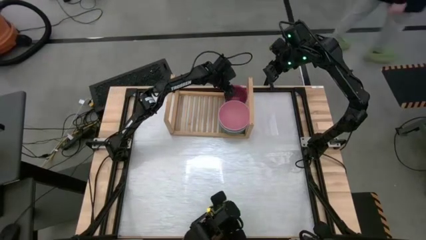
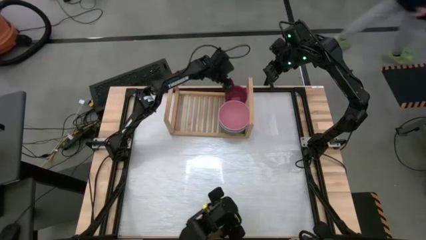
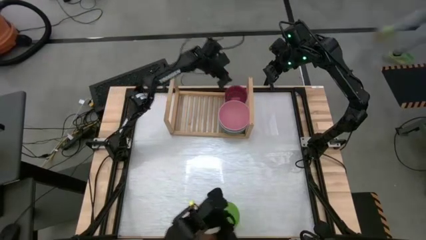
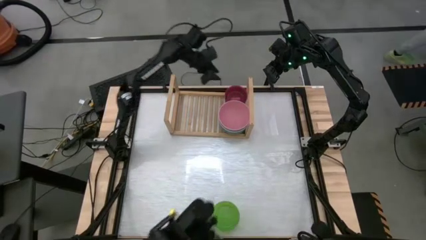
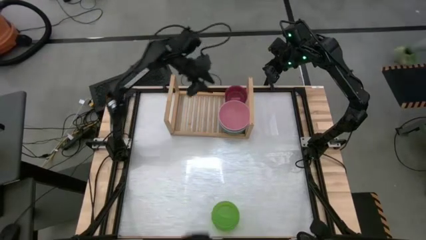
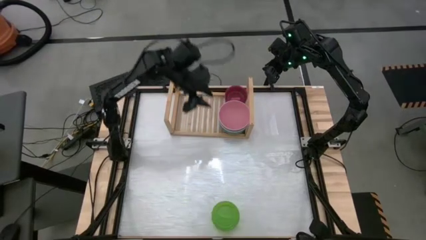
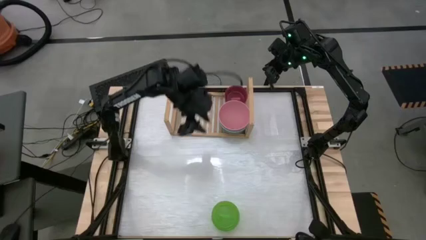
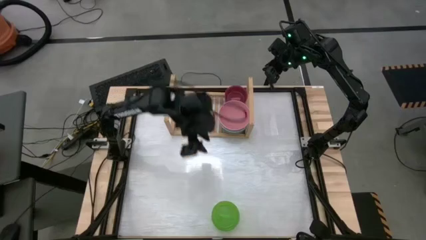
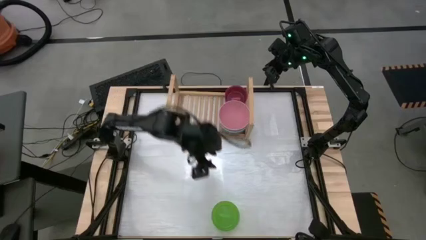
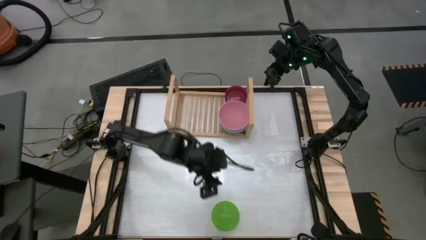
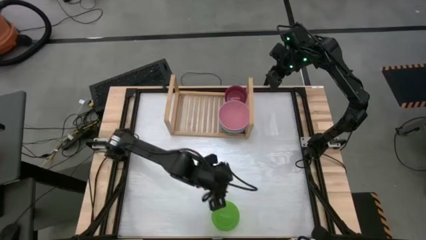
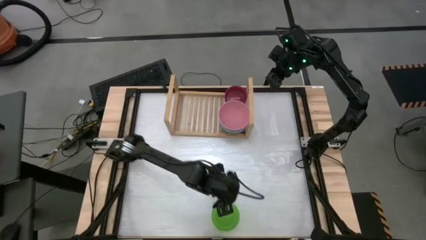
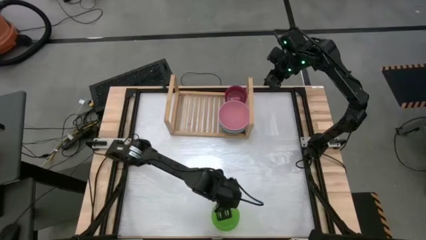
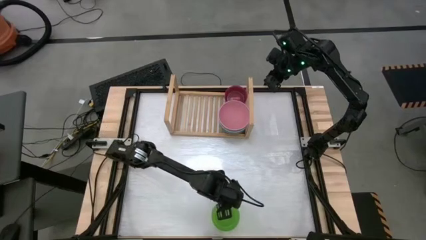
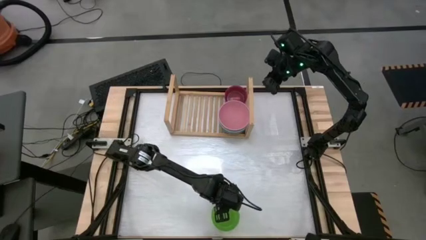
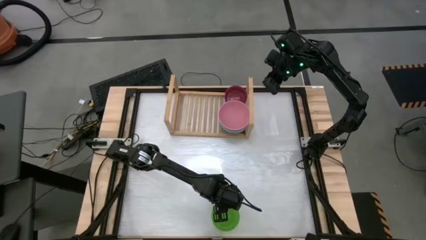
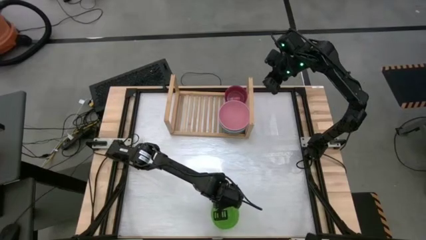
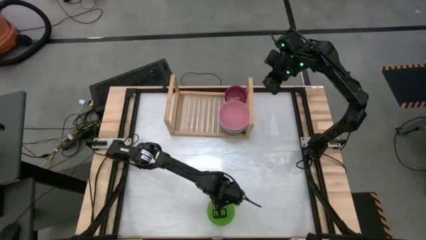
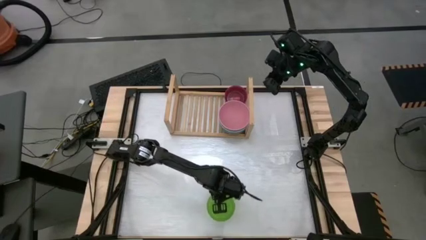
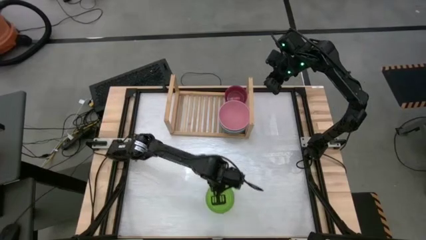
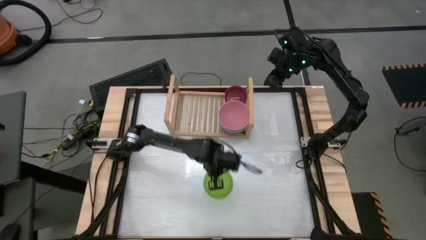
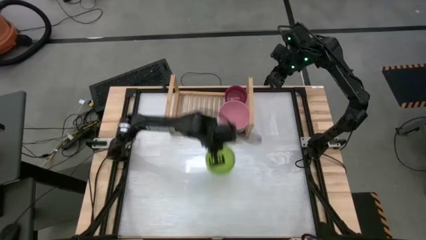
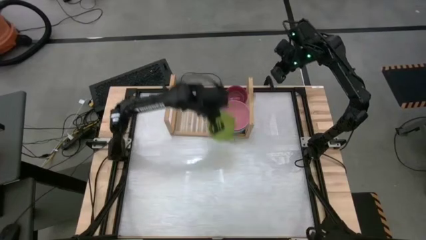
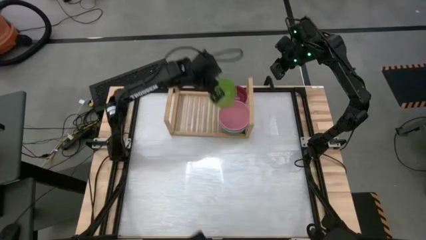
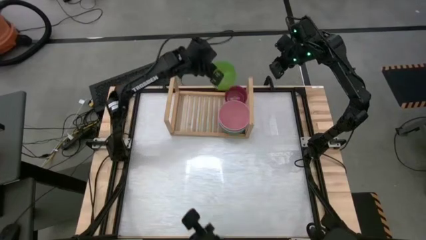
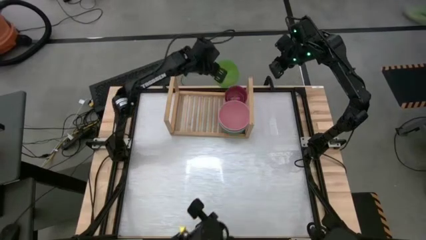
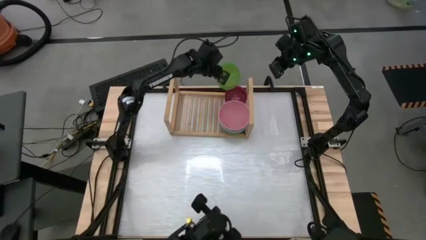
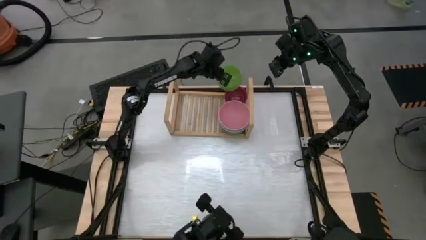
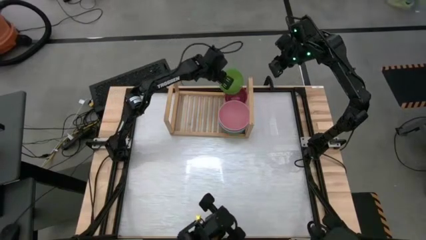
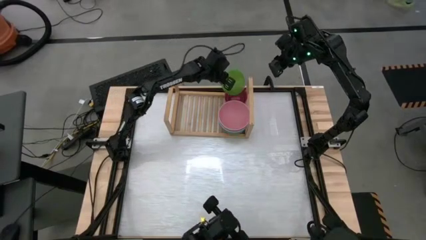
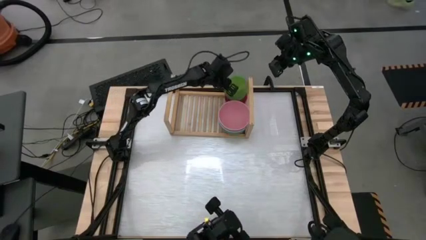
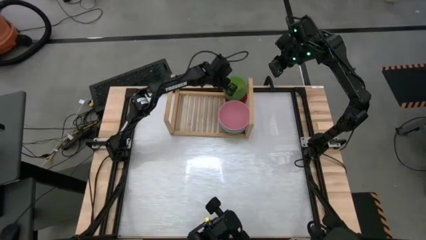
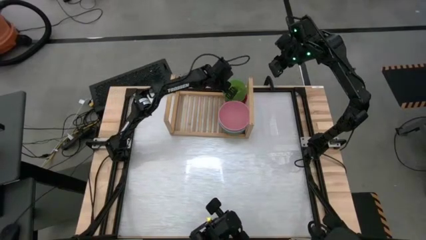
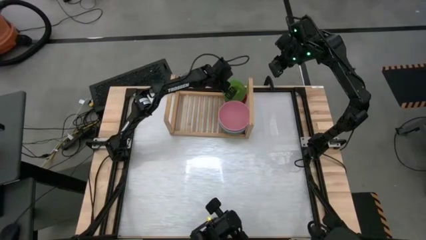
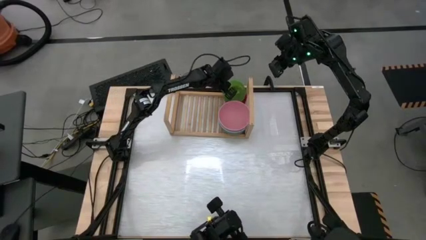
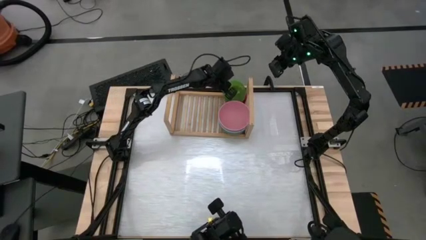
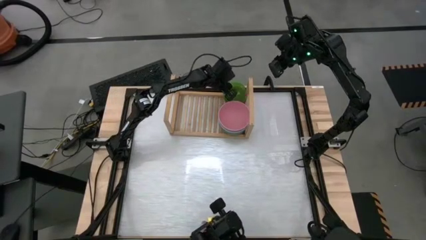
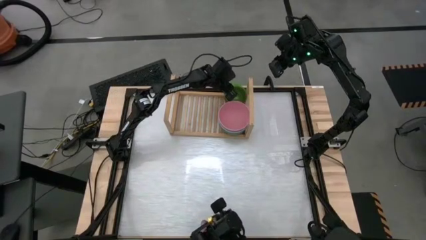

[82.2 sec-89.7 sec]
Task: Place and stack bowls onto a shelf
Stack the light green bowl on top of the light pink bowl on the shelf

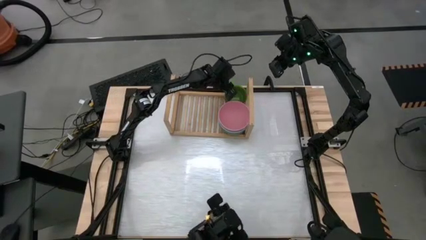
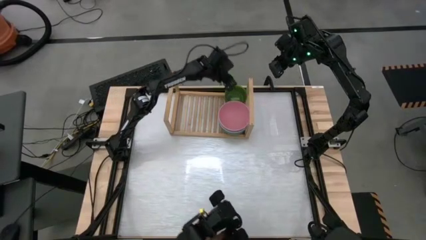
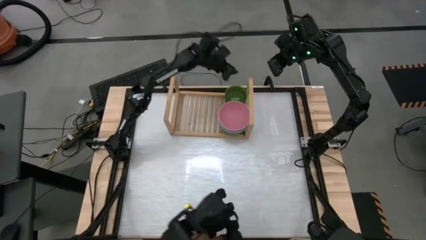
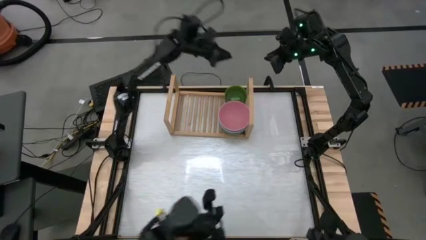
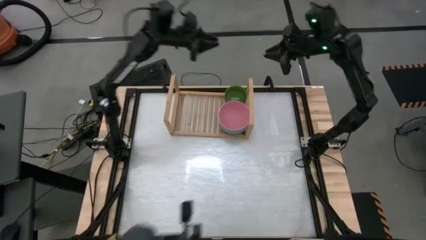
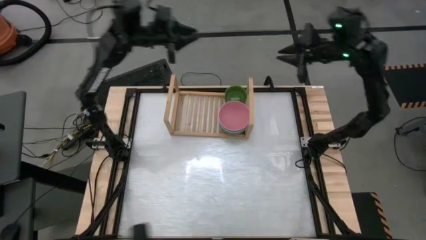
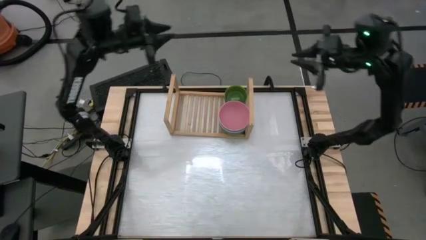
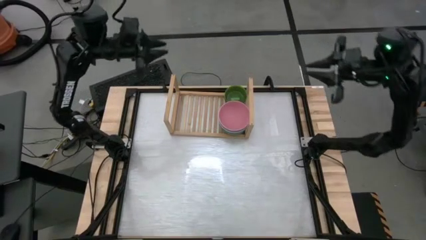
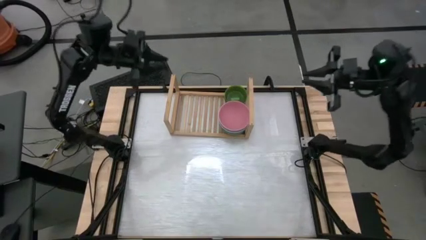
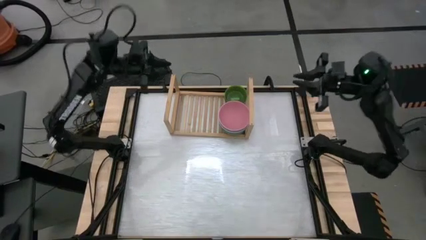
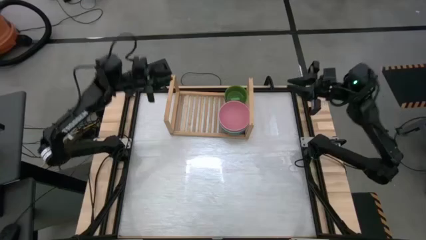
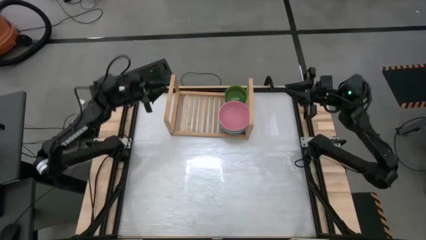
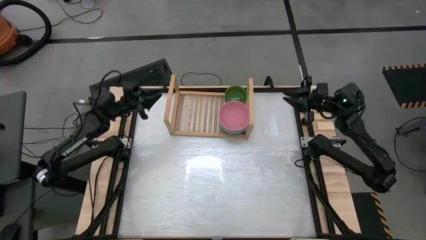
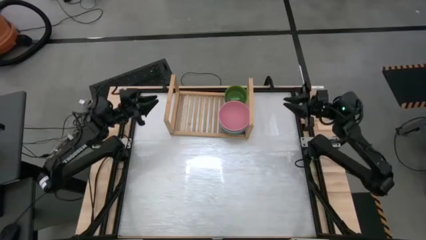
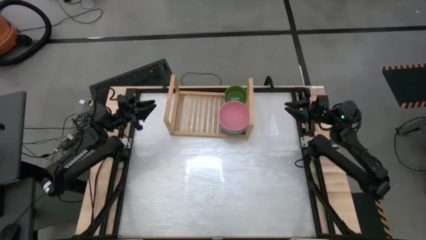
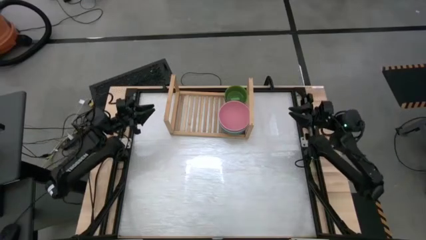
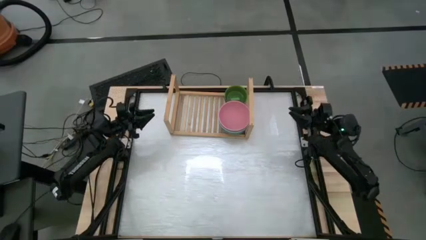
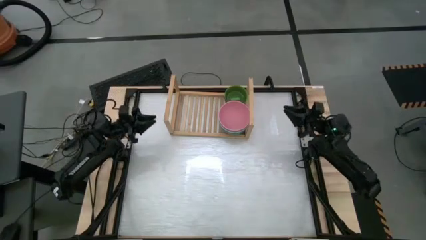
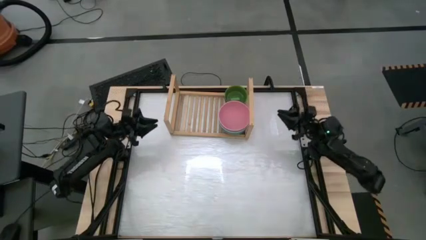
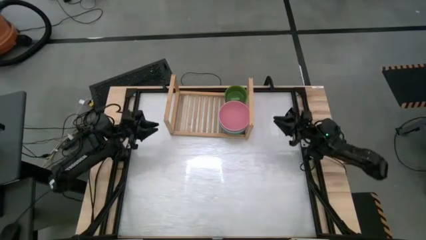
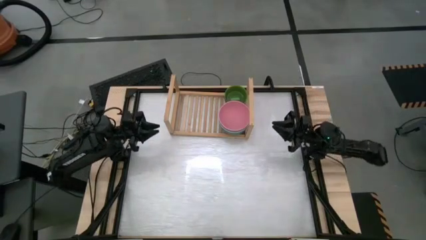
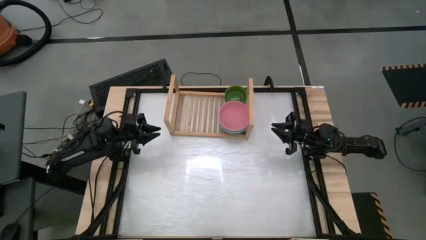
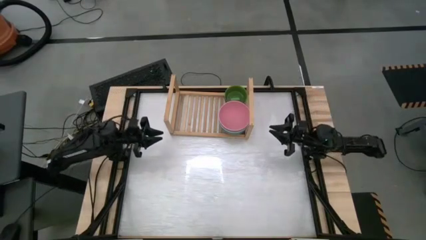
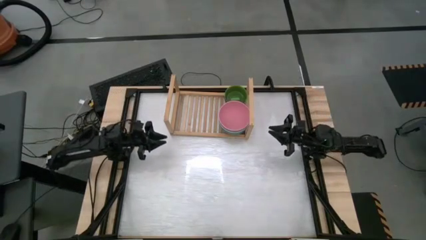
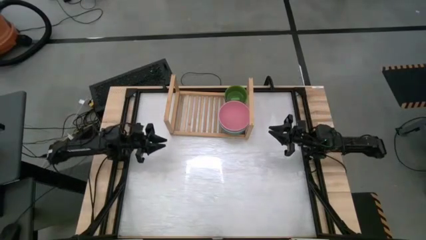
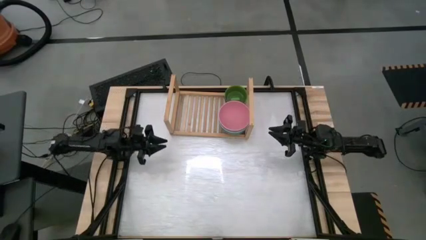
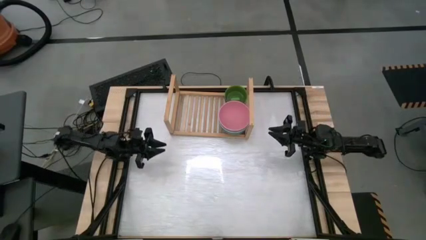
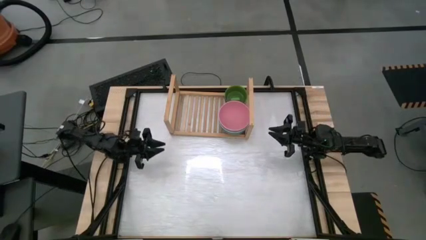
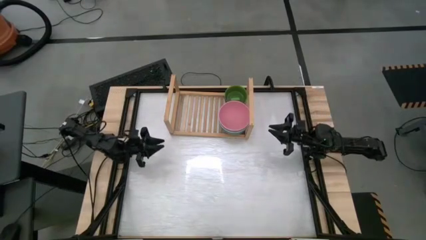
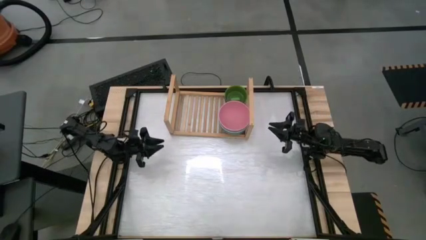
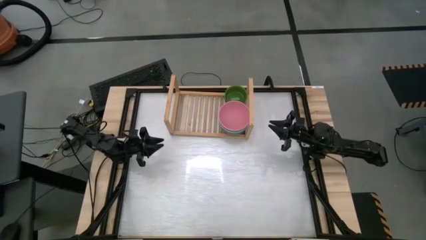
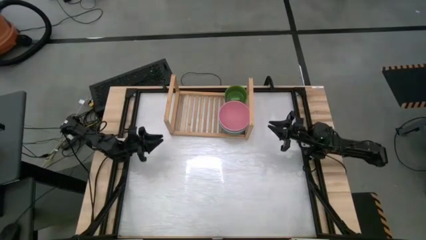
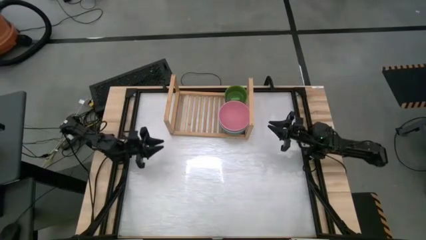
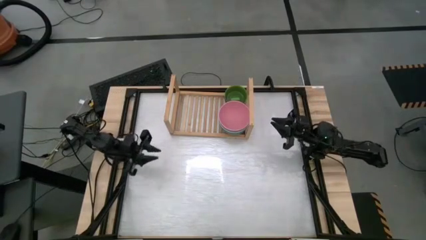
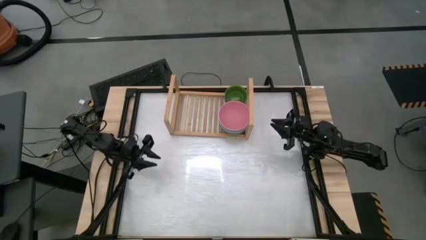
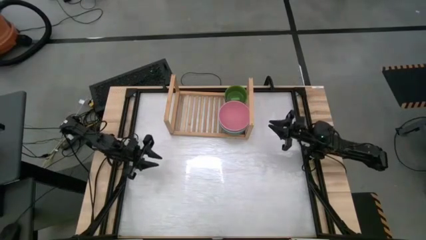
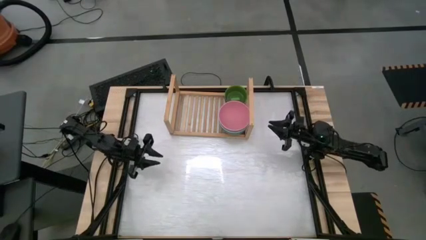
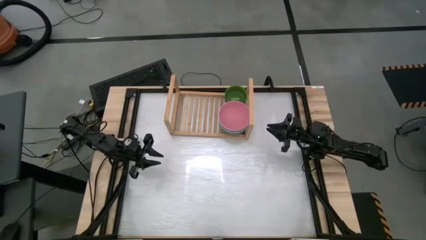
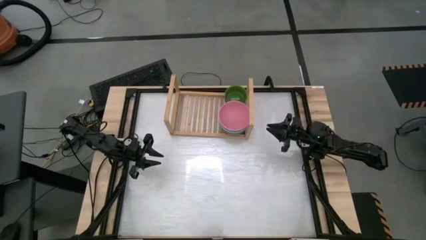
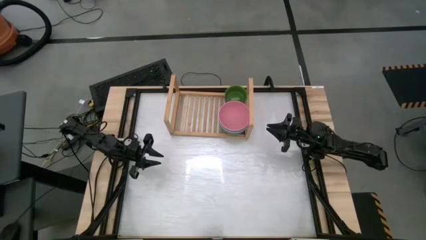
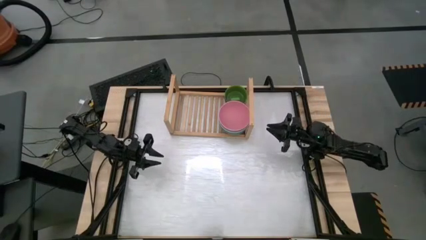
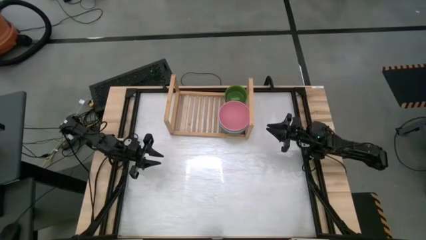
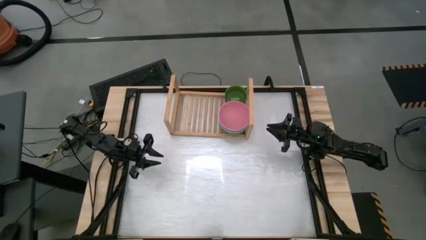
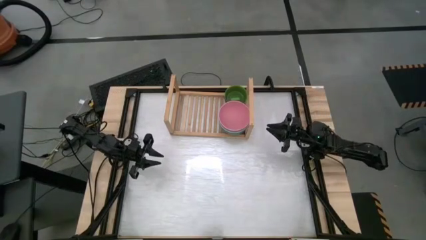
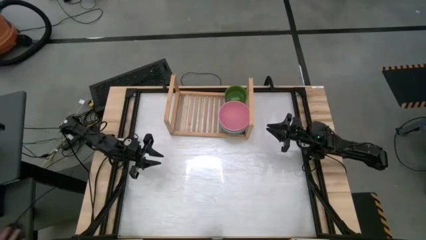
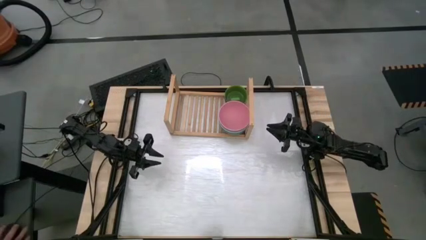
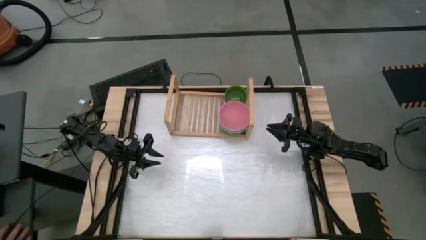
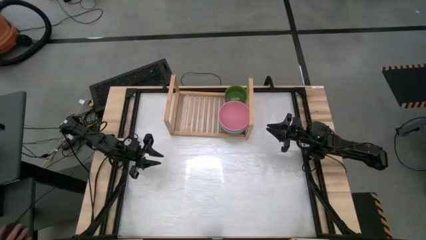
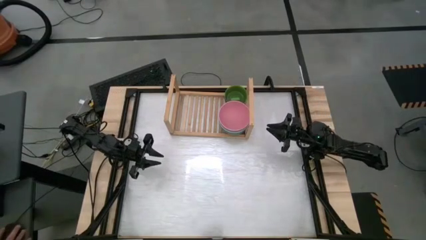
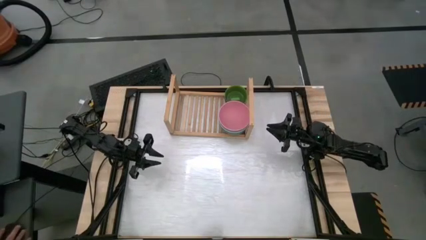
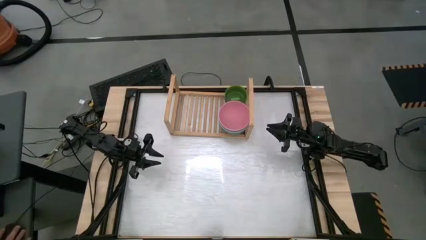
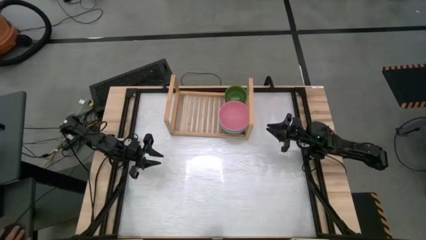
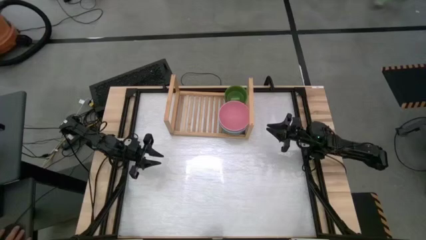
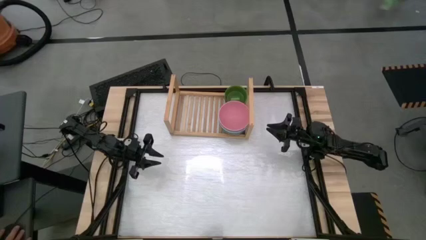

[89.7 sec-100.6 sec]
Return to Home Position
